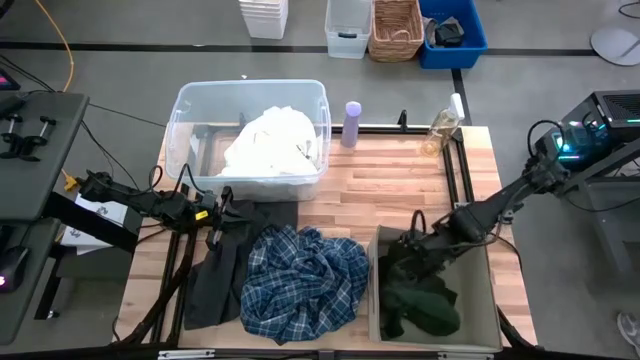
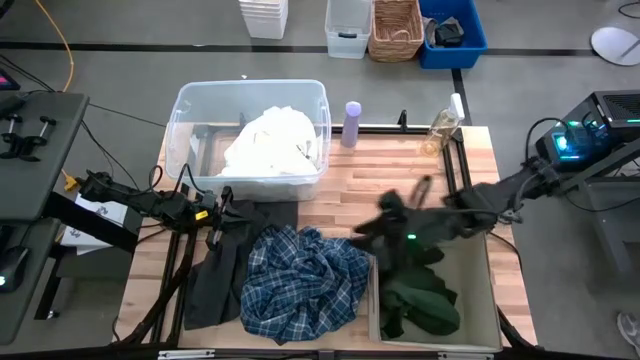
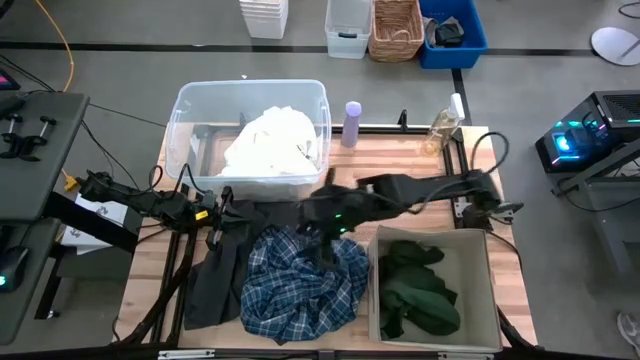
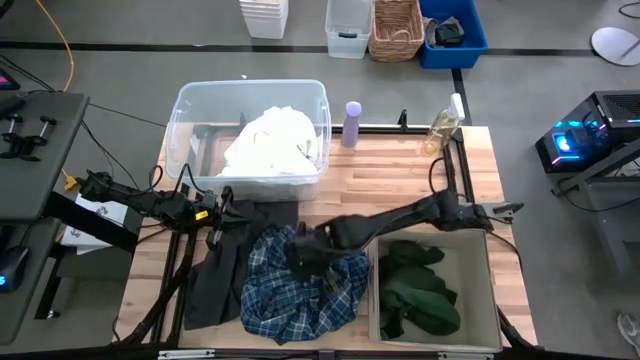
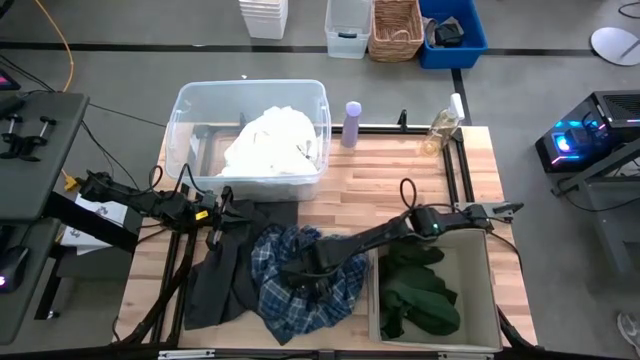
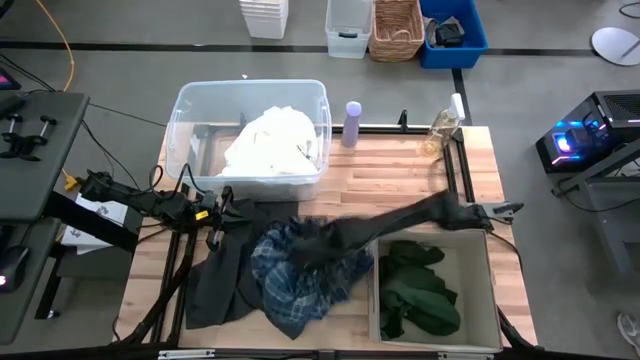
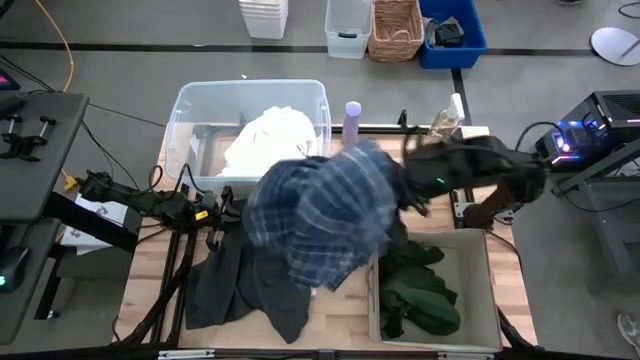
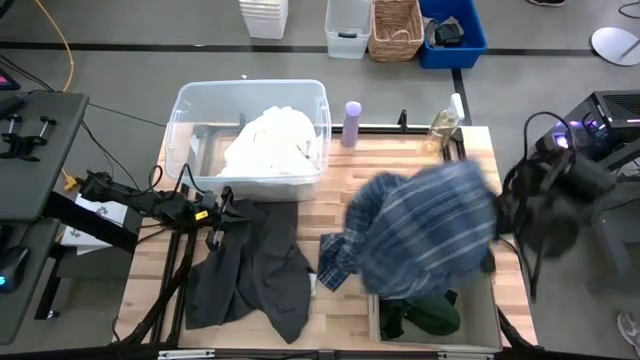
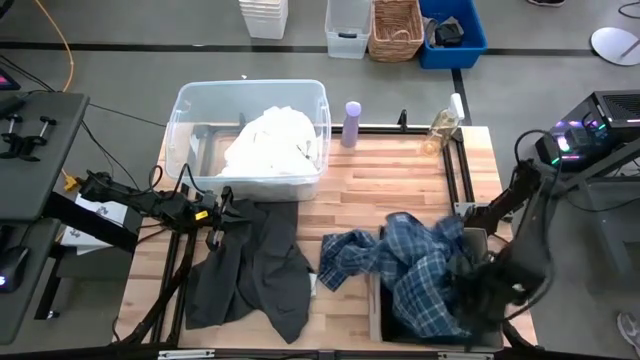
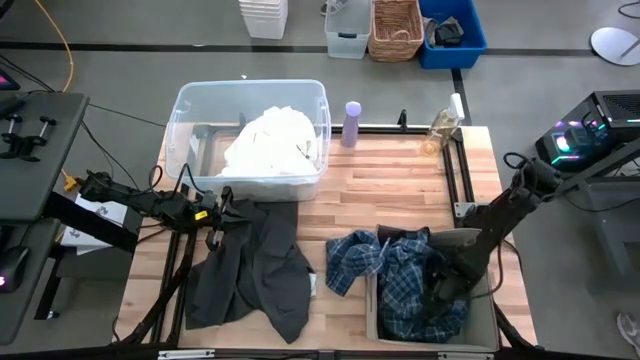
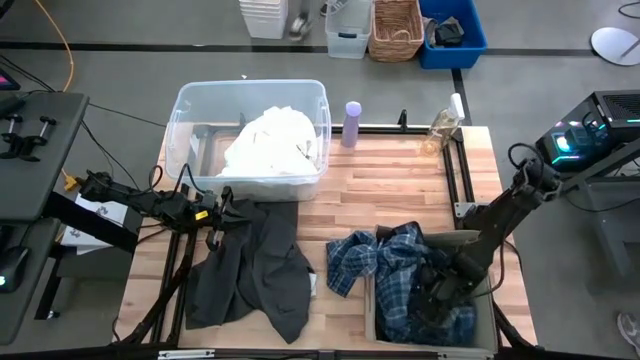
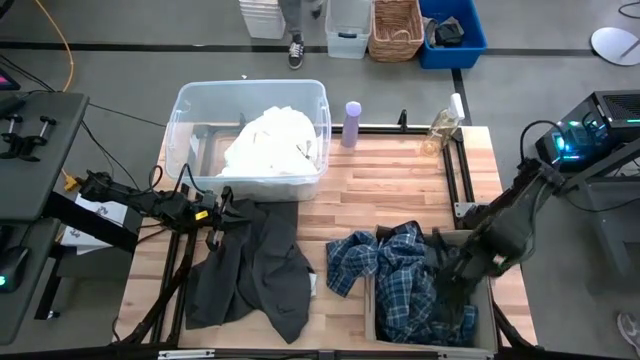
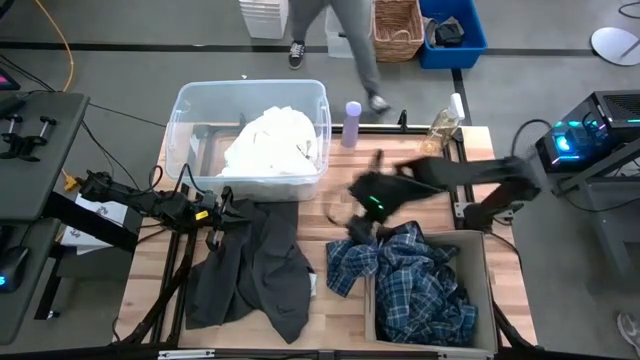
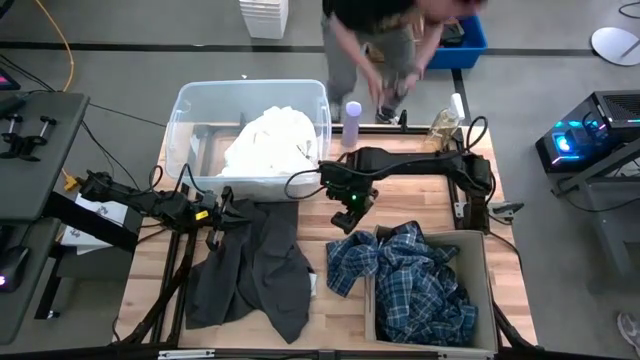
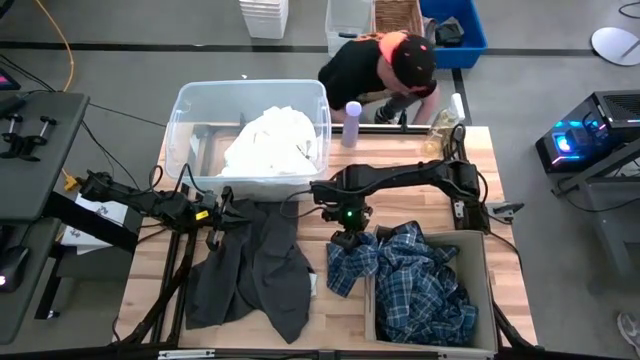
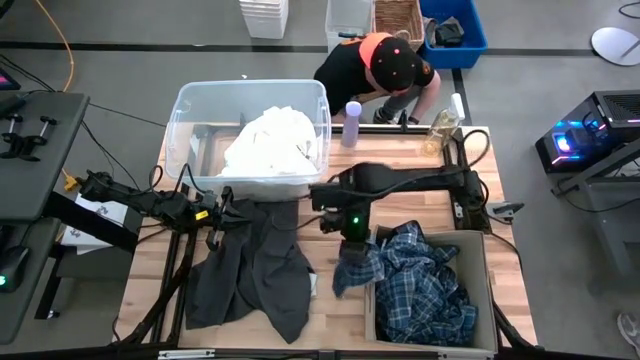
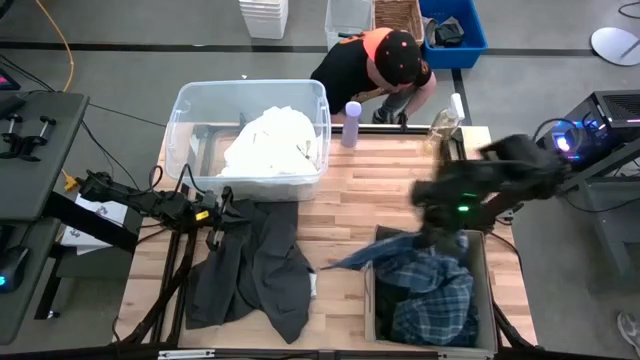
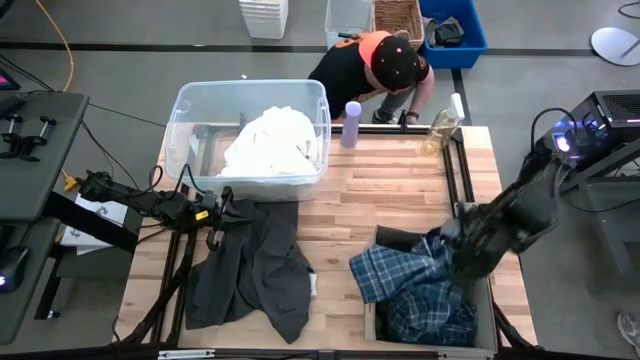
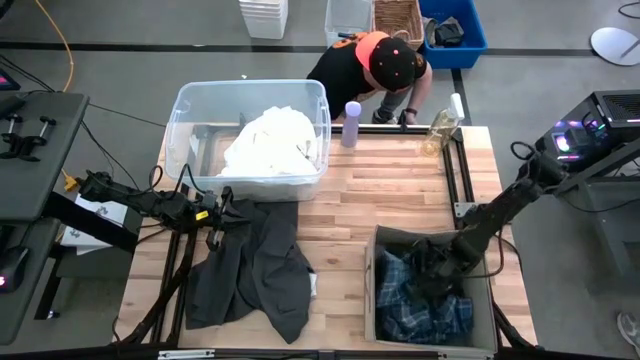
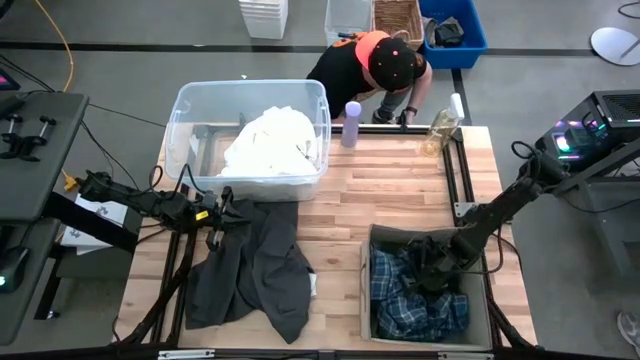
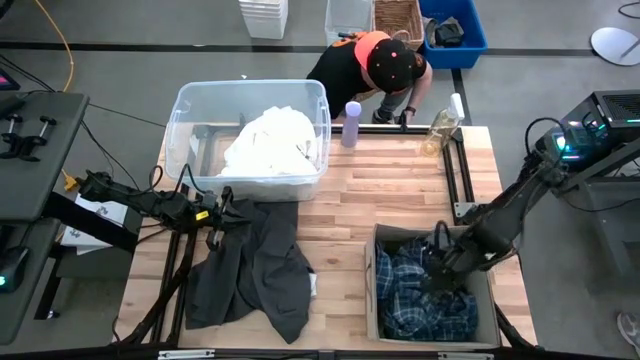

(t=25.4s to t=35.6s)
Task: Sort clothes
Put the blue cloth into the brown bin

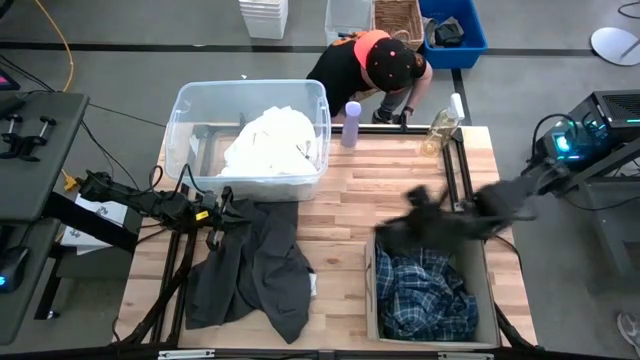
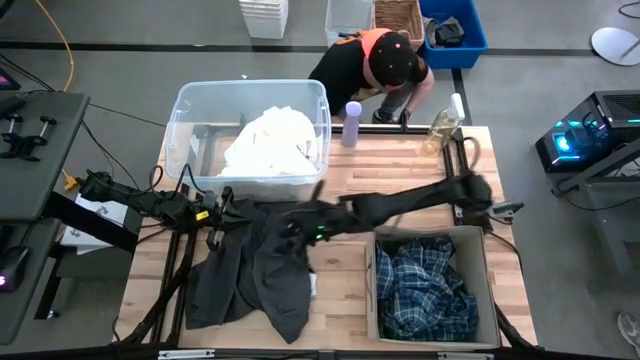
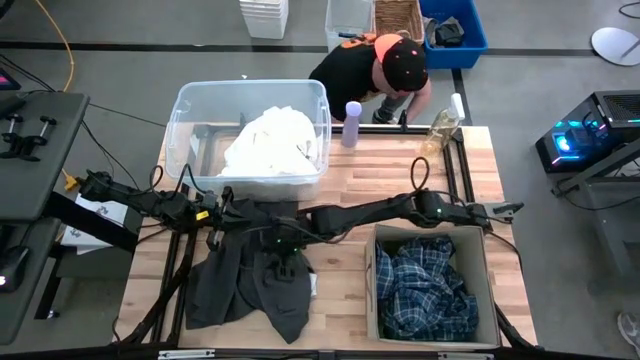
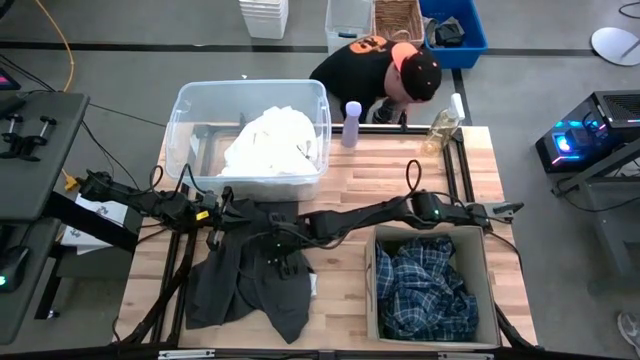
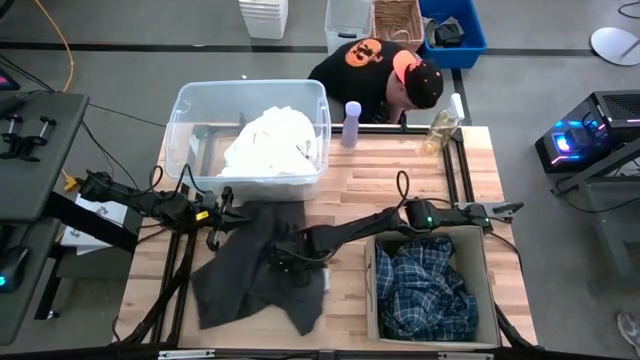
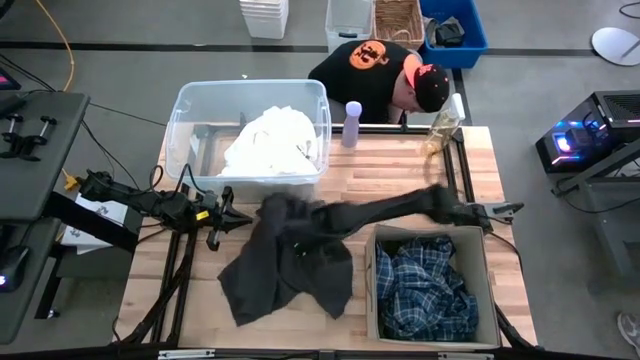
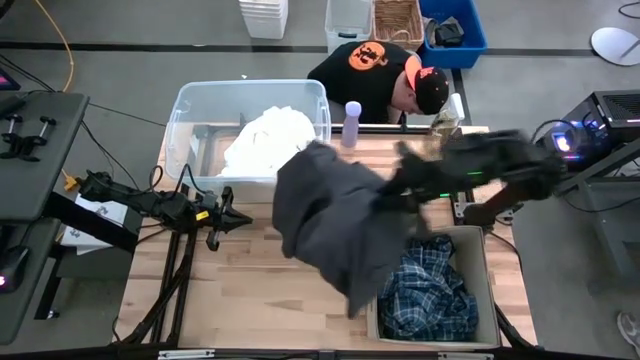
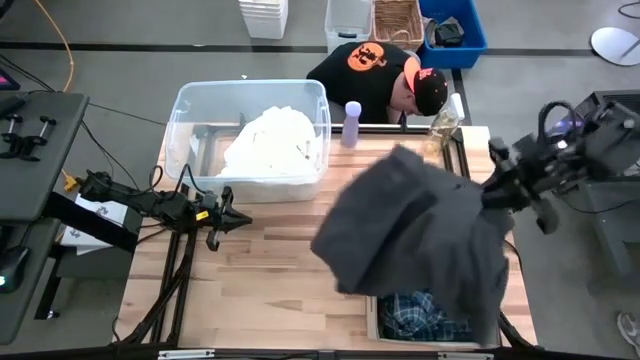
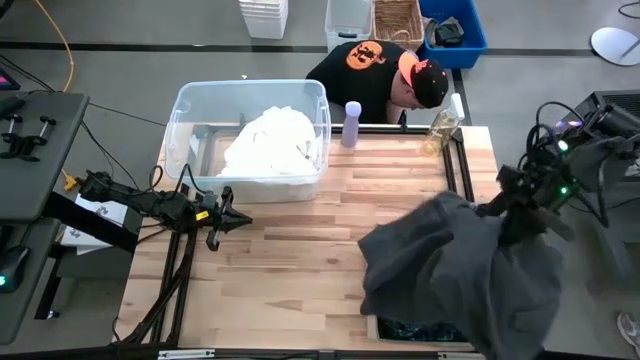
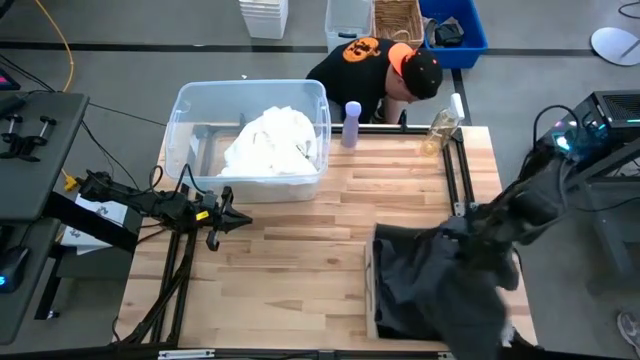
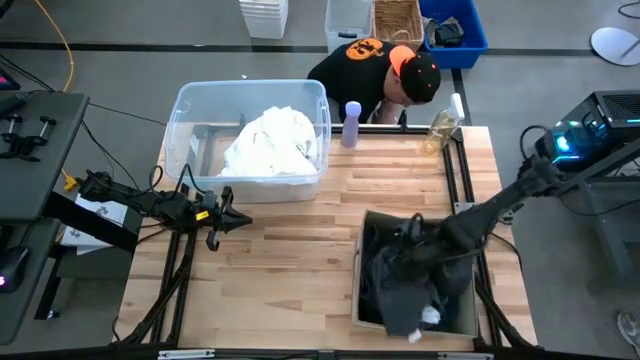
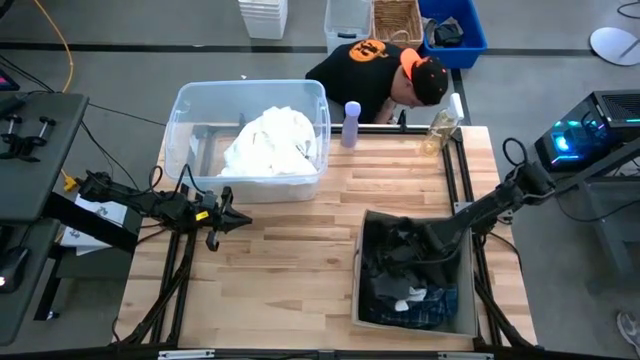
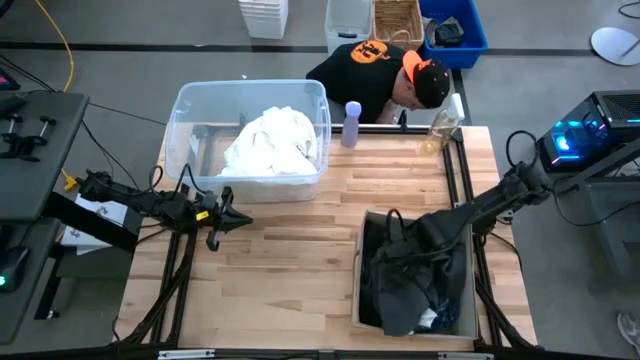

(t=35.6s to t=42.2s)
Put the gray pants into the brown bin

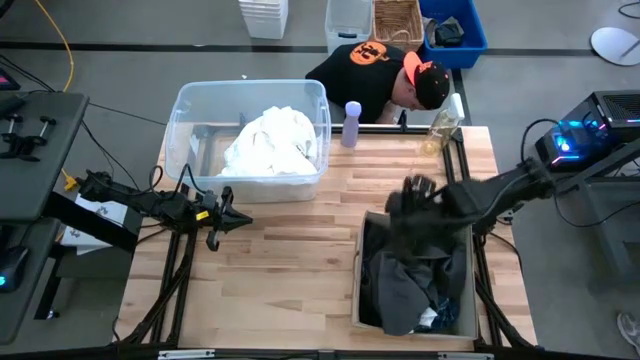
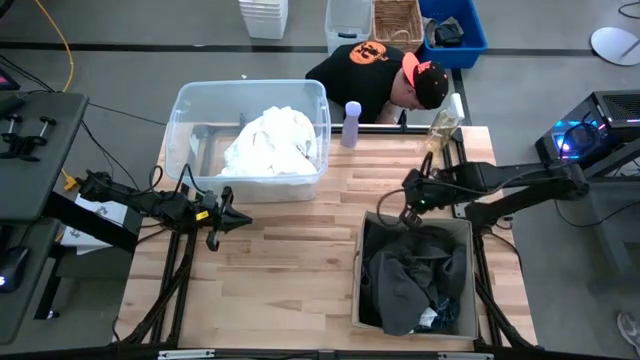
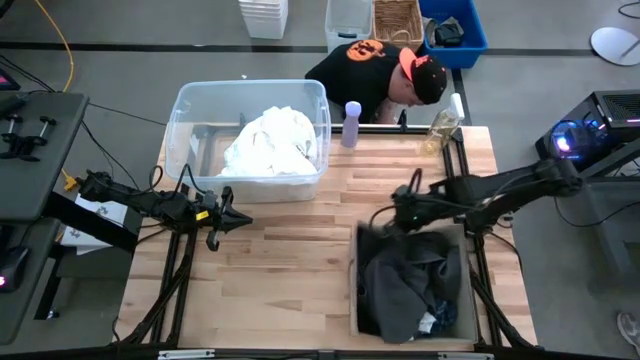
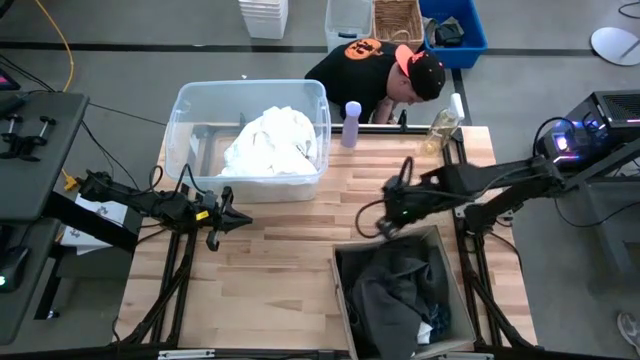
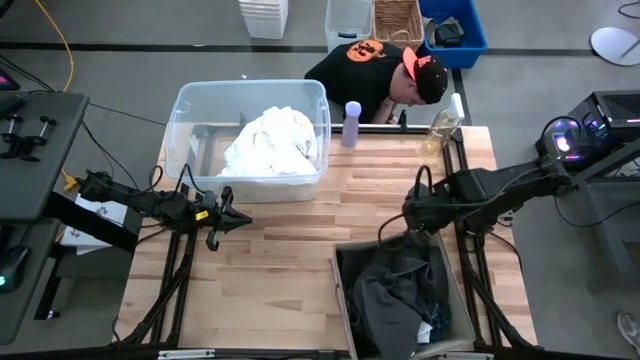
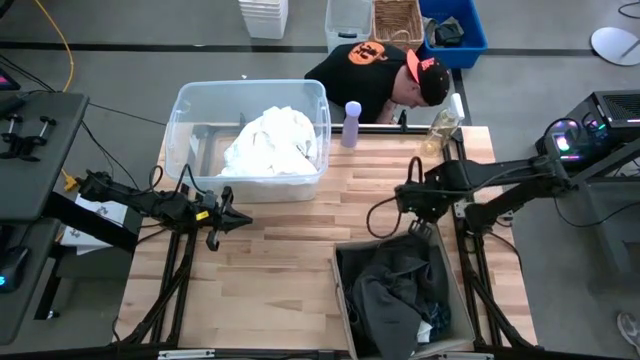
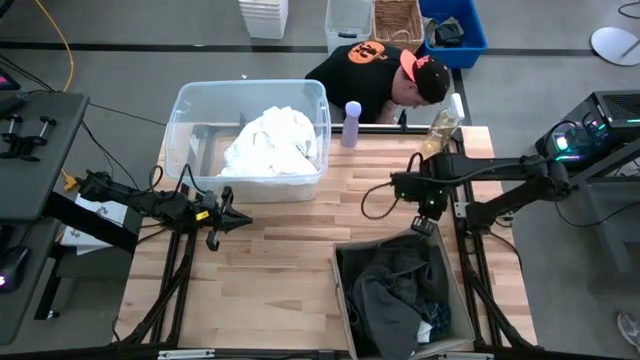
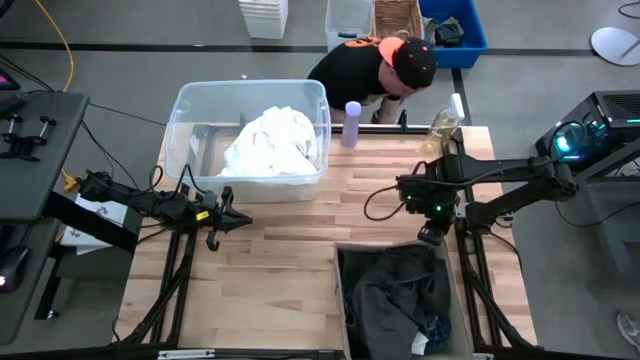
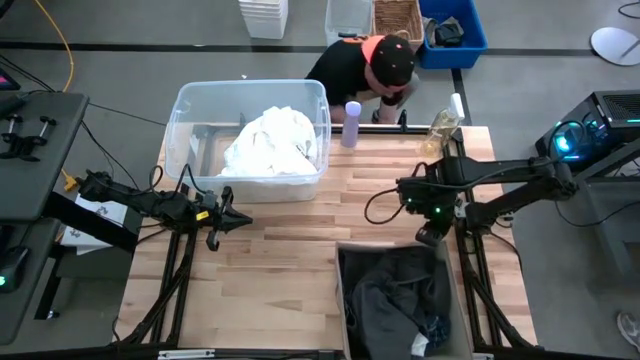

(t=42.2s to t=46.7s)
Adjust the brown bin
